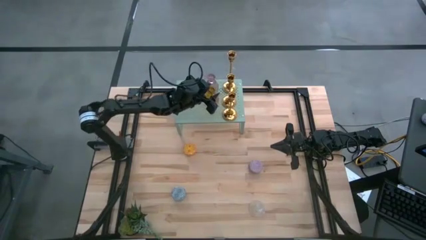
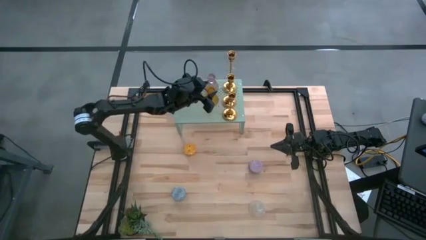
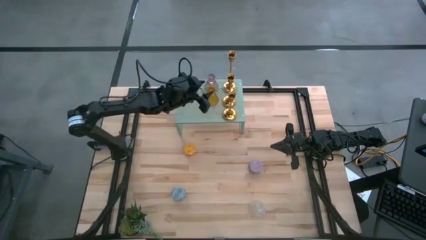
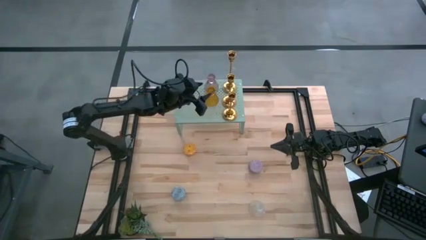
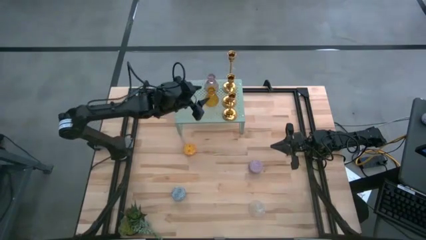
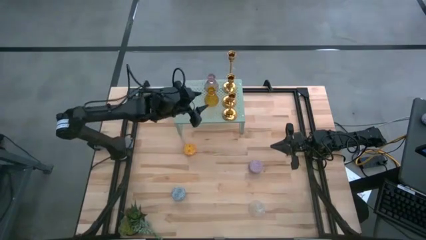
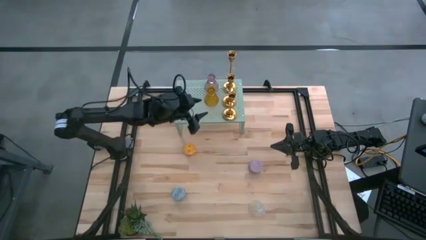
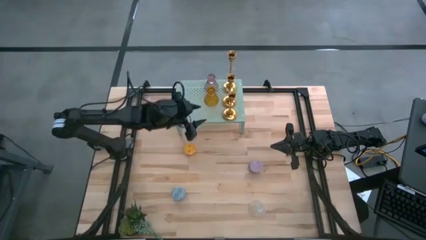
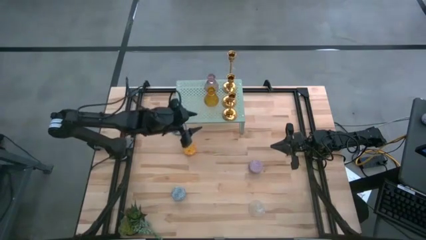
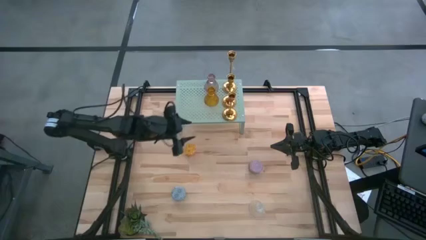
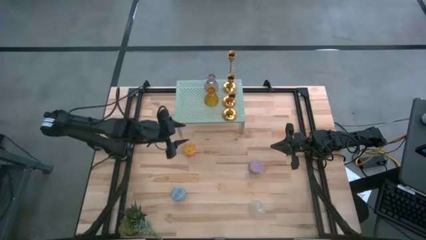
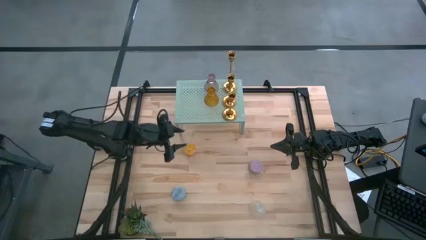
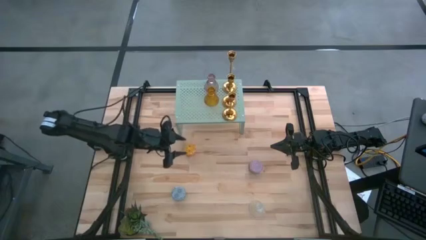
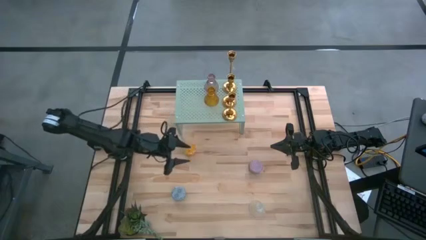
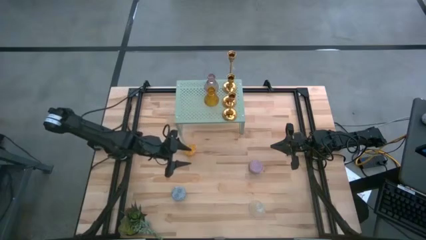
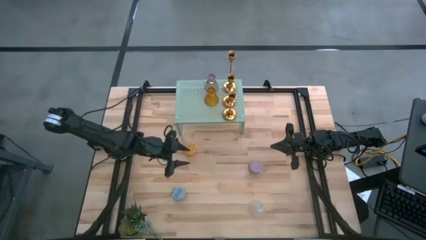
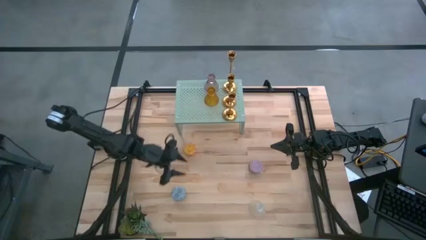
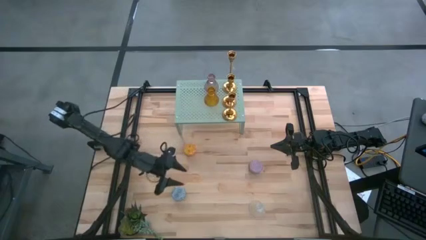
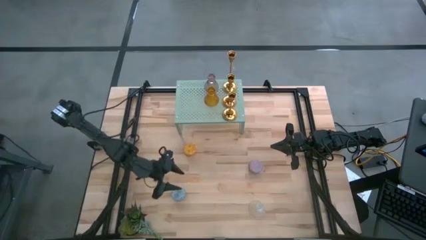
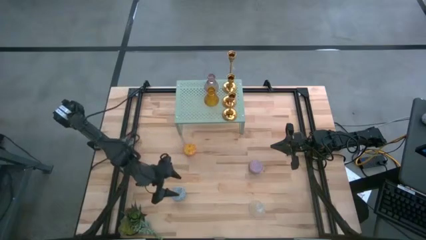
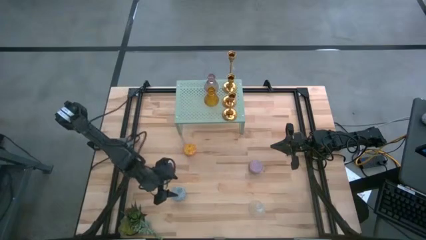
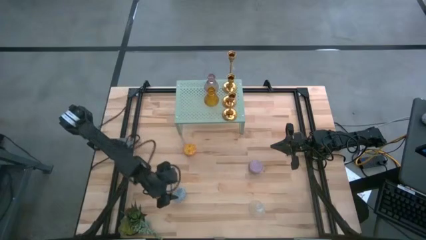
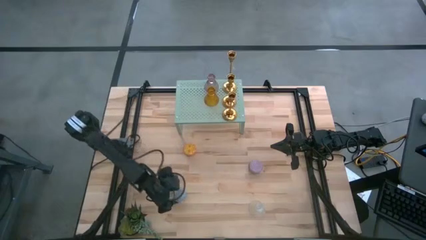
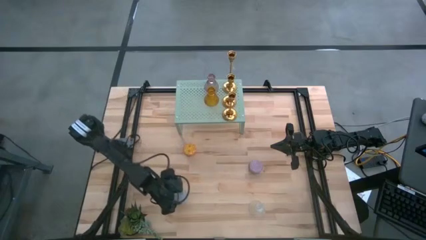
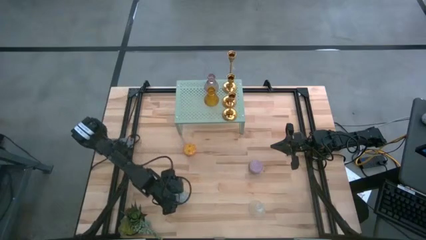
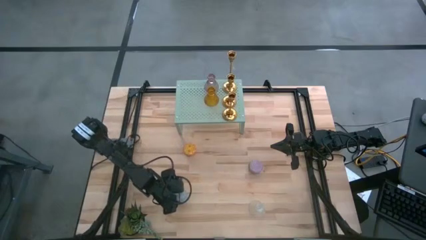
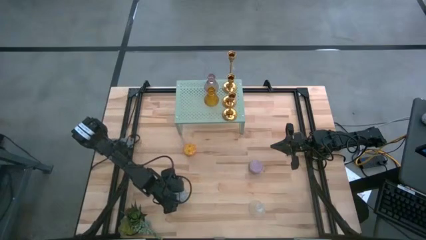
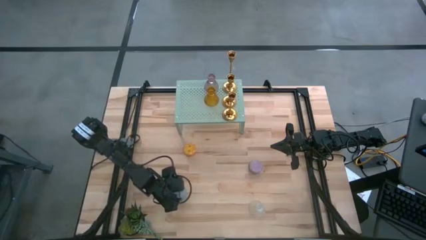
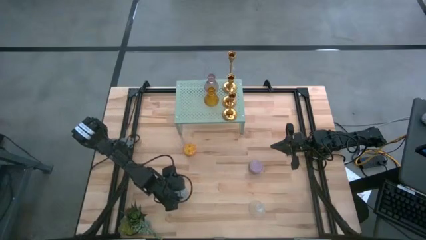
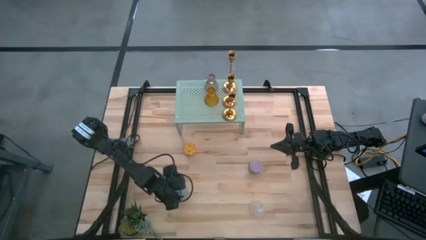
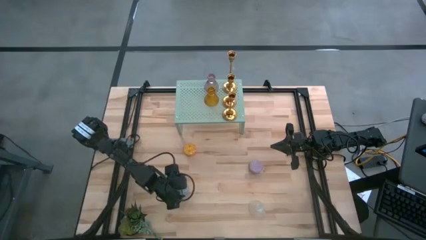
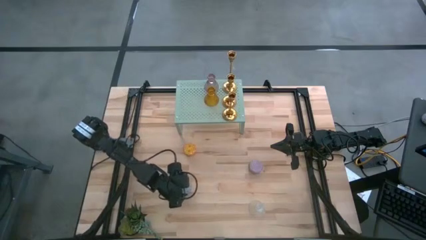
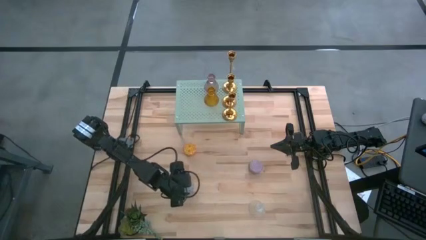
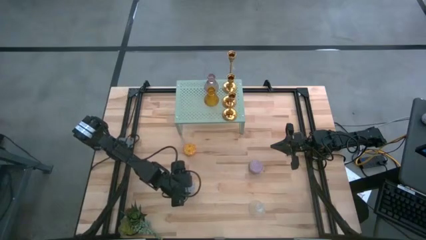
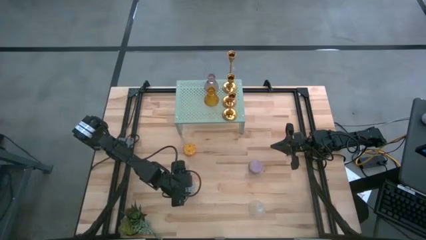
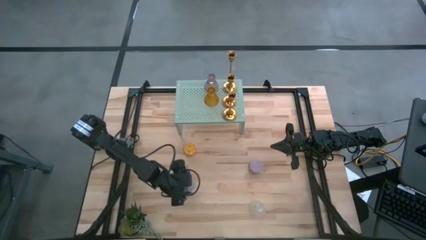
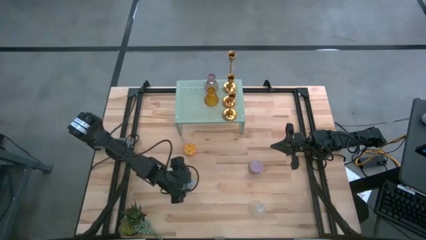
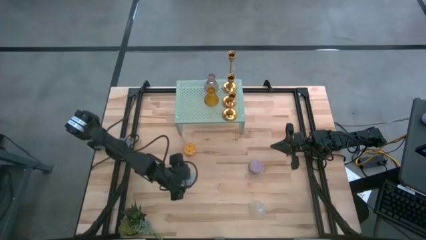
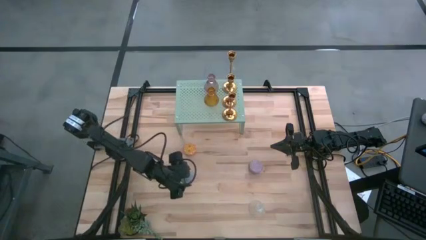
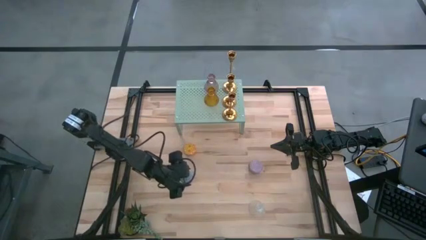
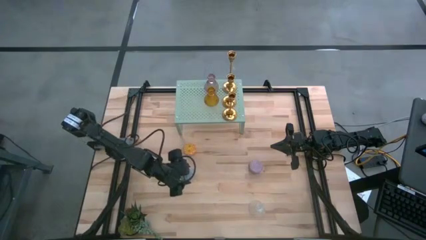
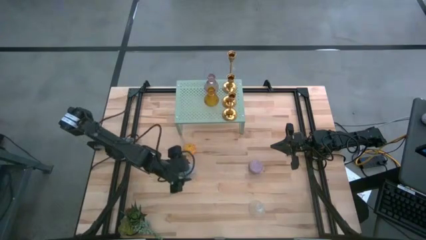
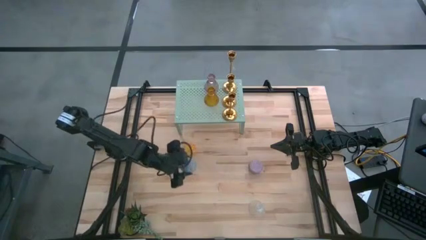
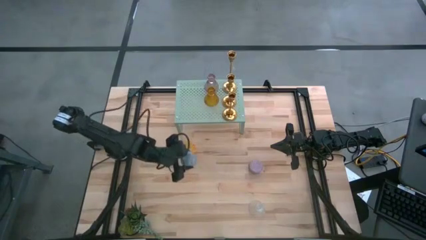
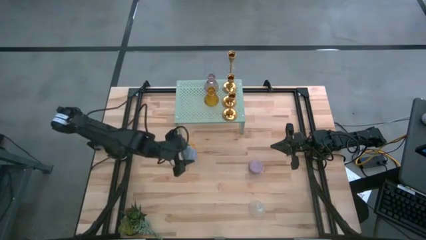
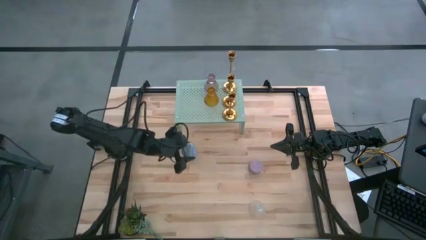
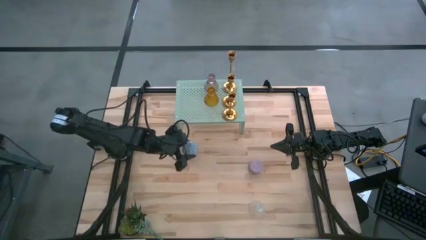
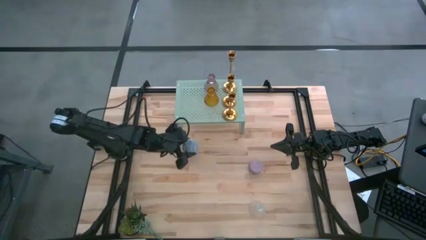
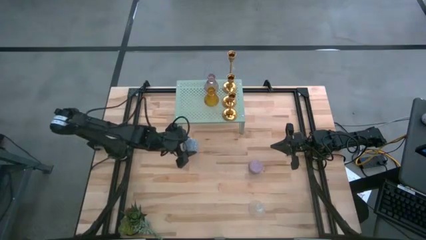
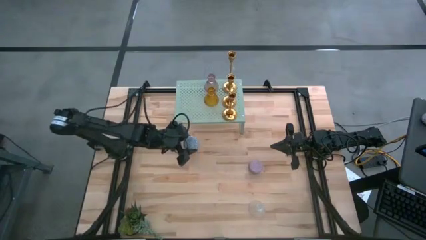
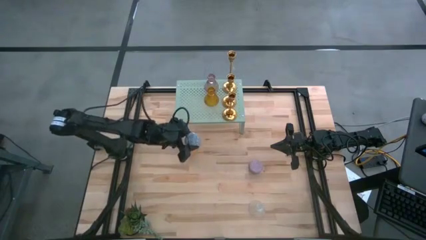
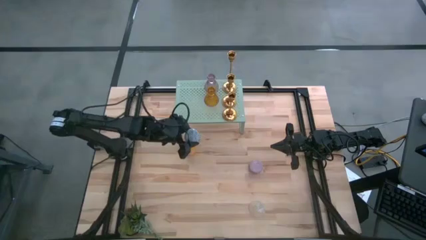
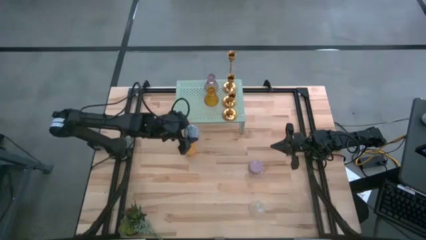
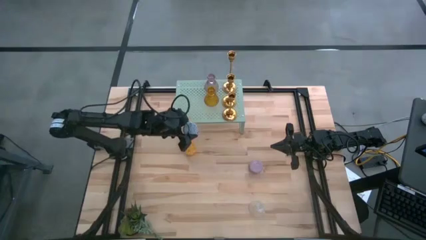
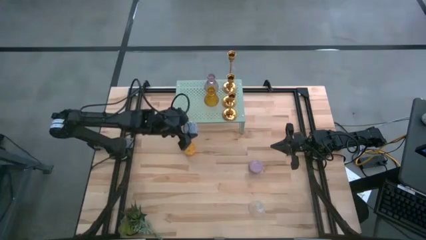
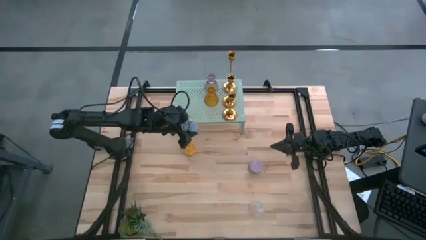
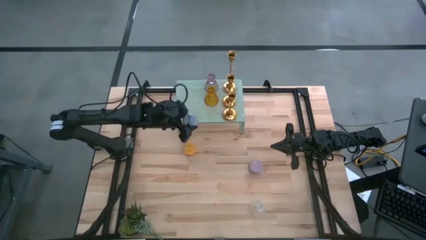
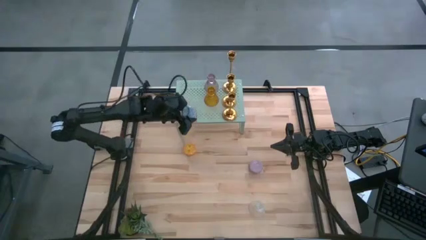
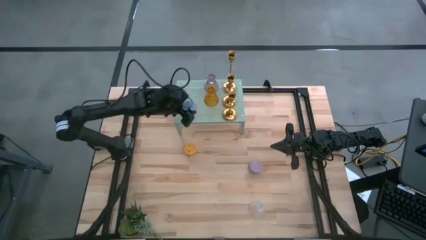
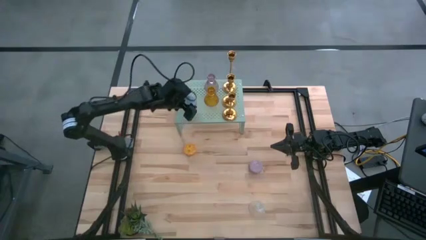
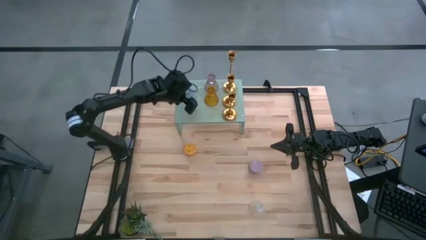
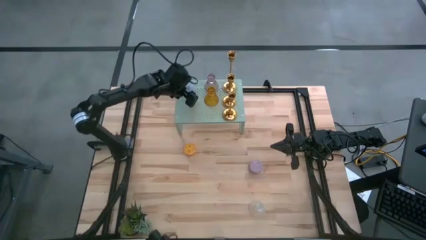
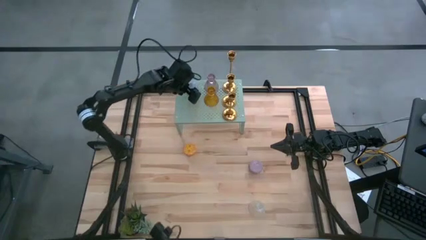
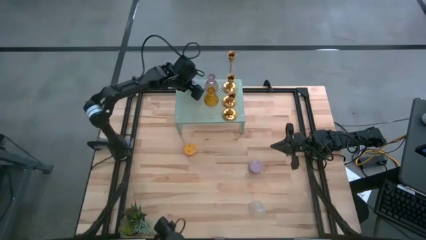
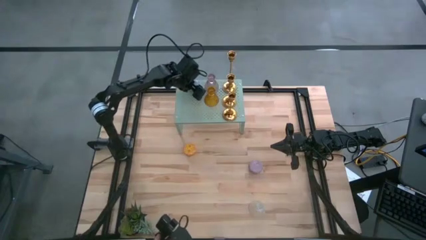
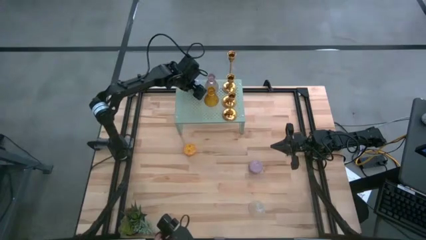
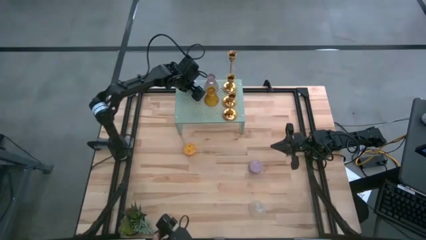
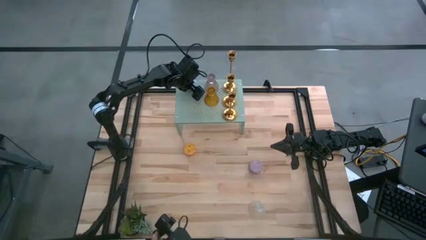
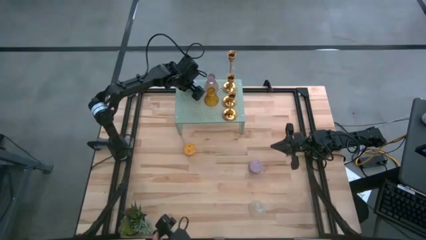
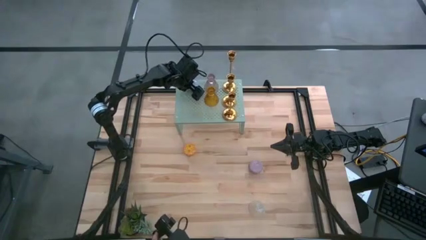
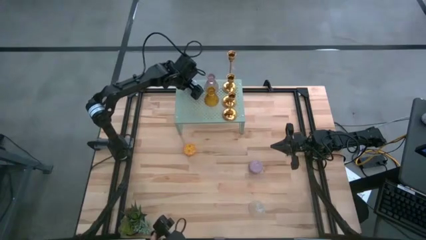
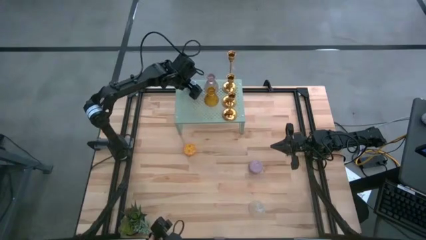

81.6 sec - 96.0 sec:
Task: Pick & Place candle stick holders
Put the blue patterned scented candle on the shelf
